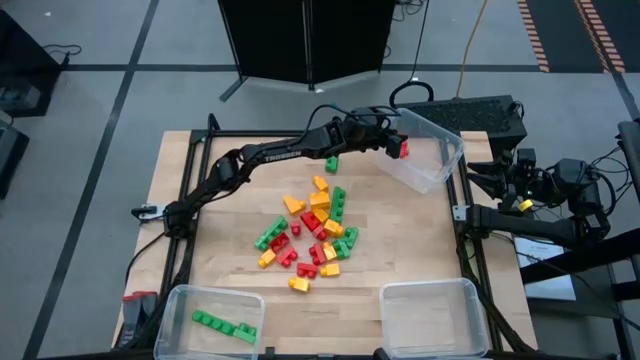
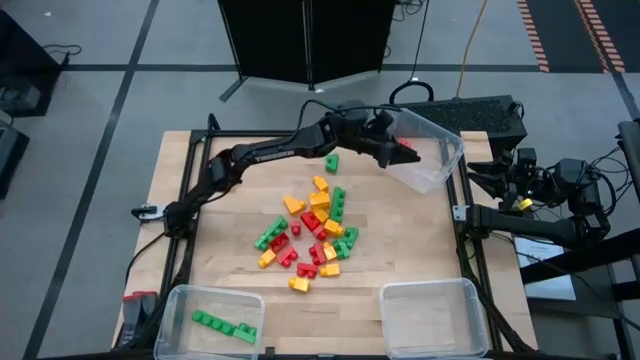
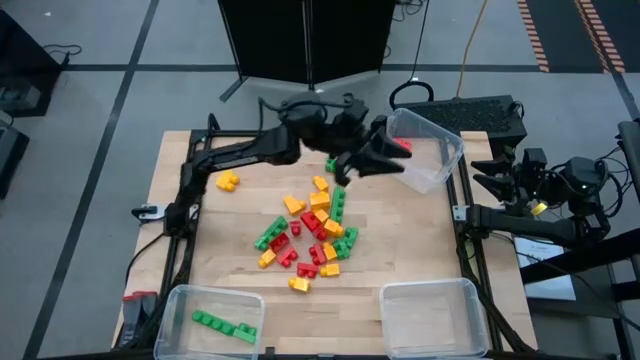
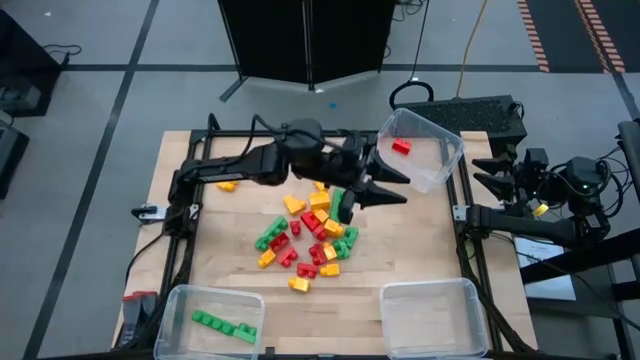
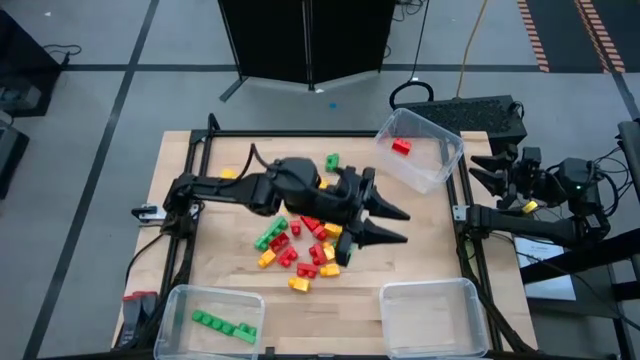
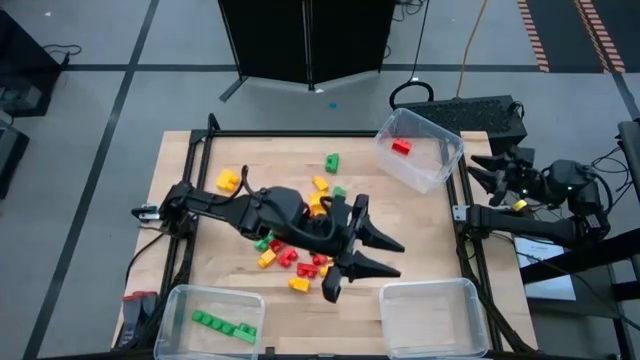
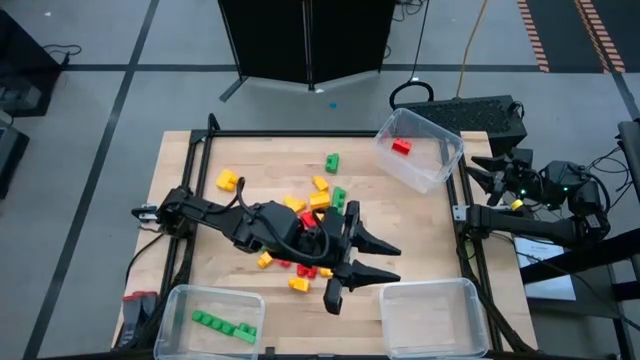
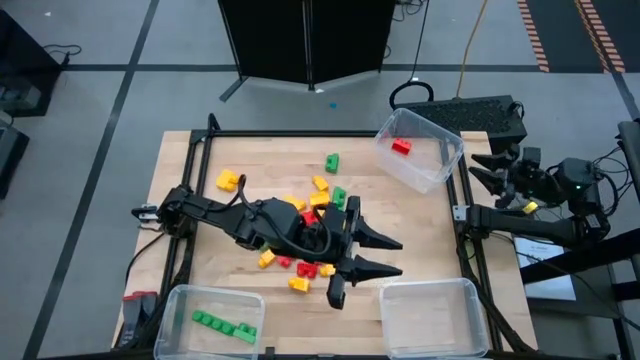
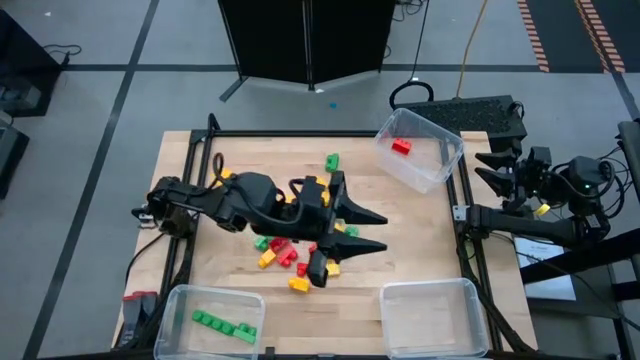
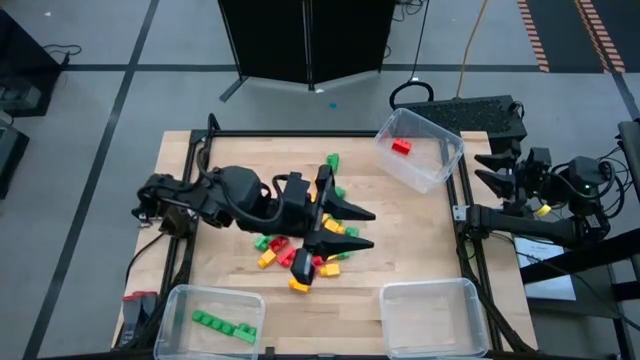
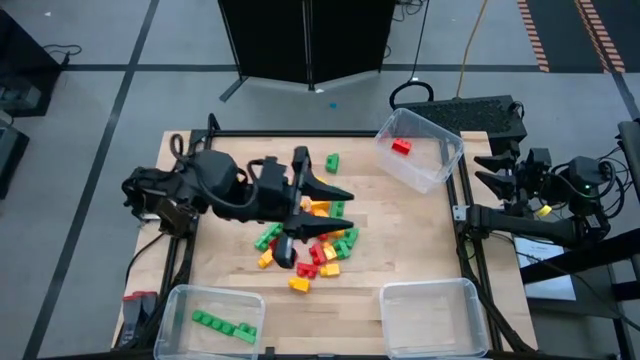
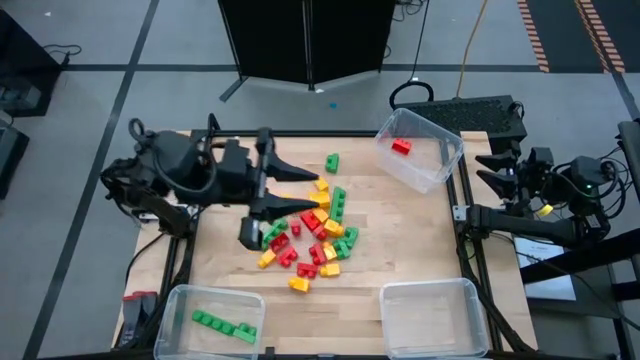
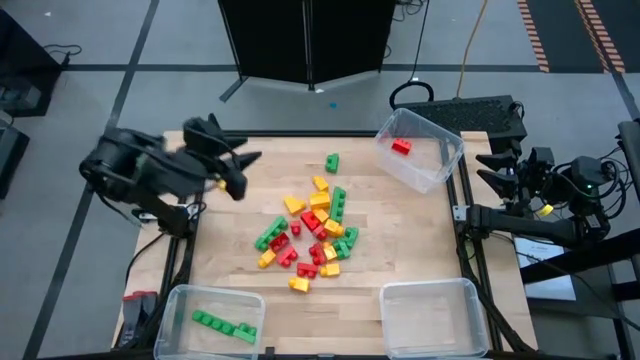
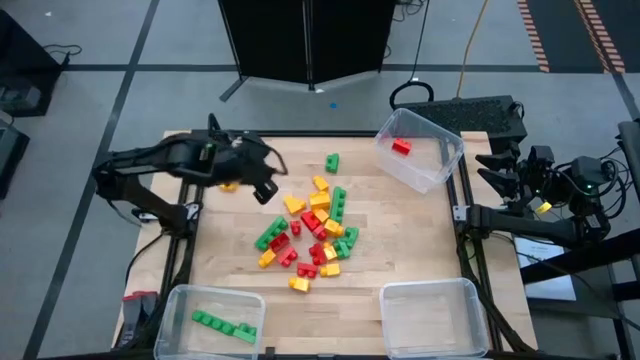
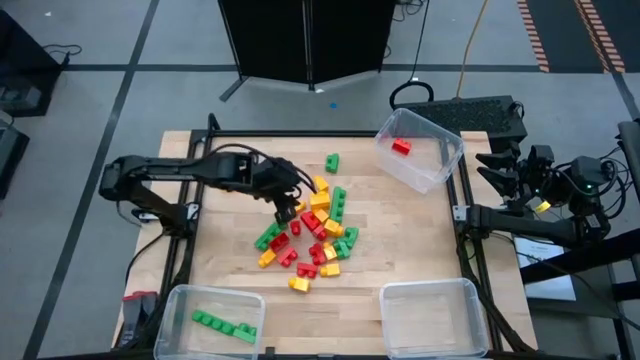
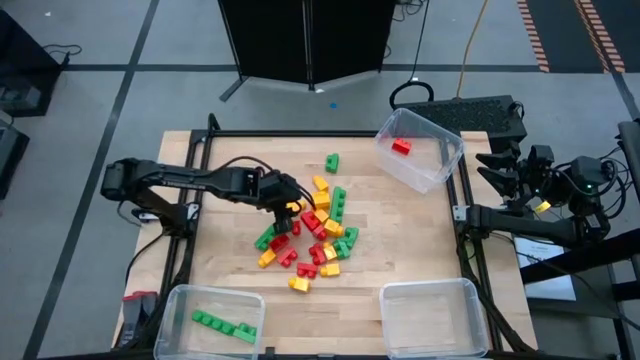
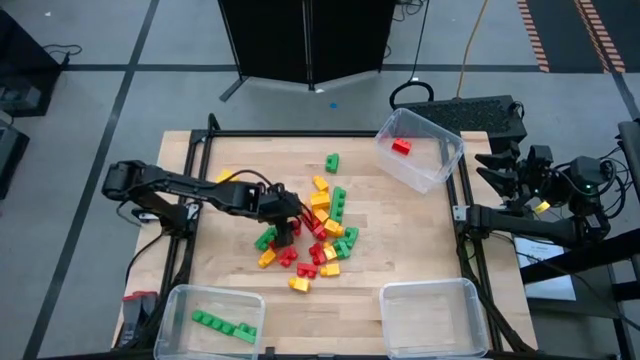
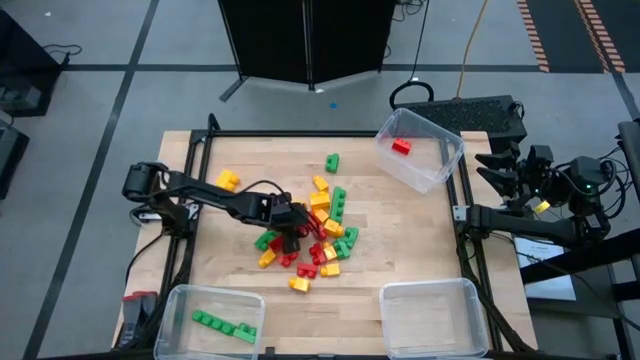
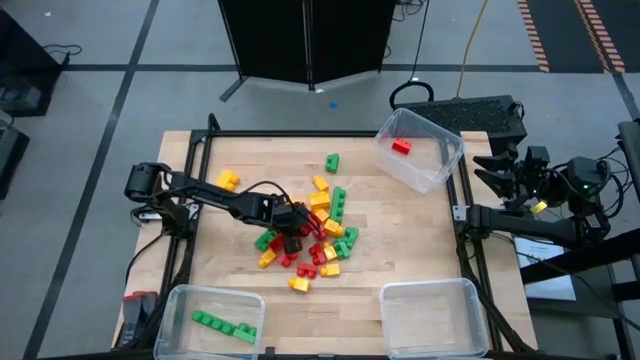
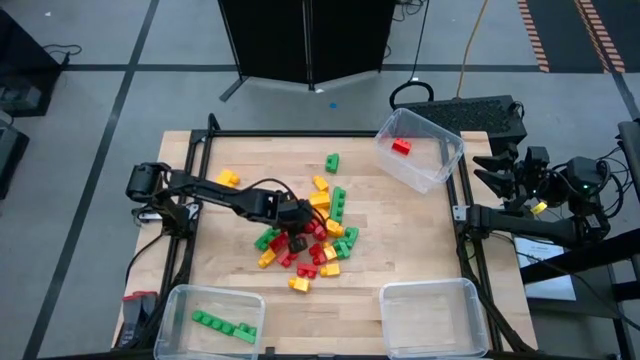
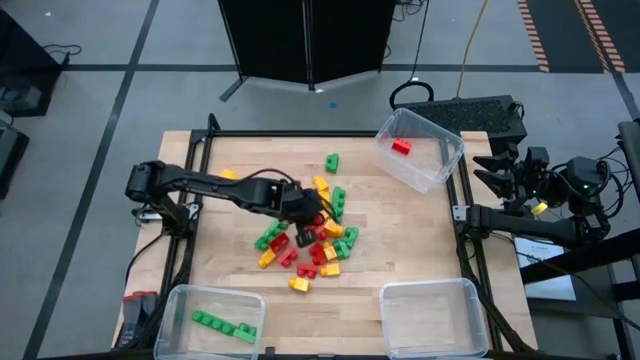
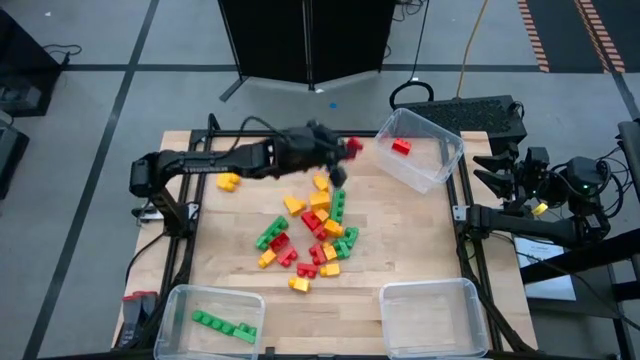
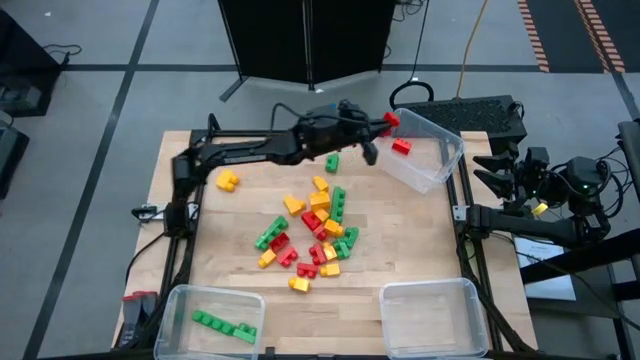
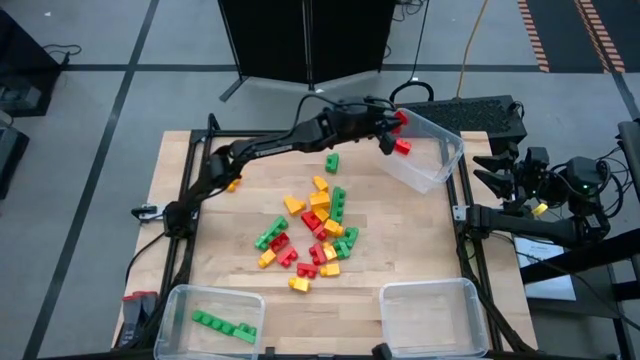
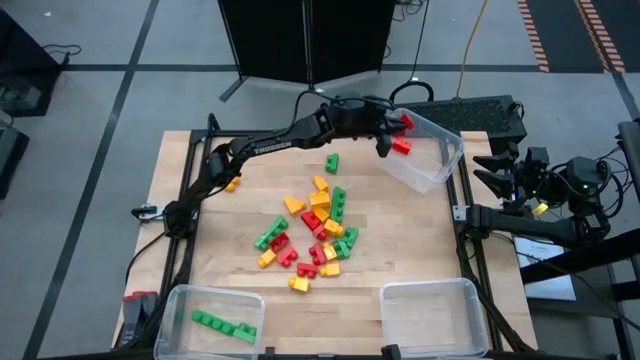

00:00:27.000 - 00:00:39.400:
Task: Sort blocks
Put the red game piece into the top transparent bin

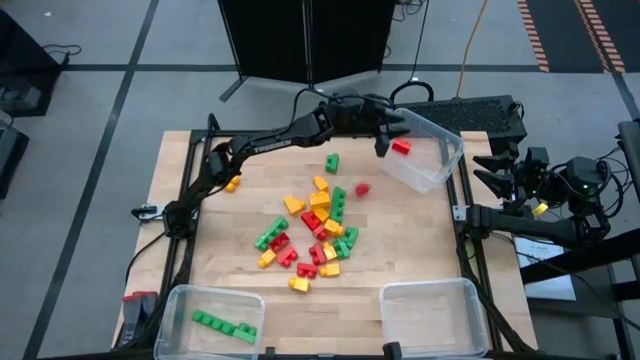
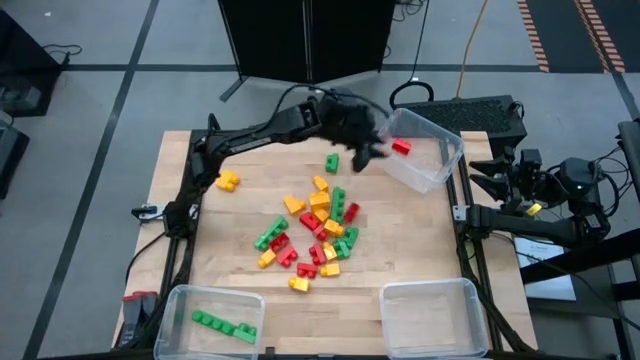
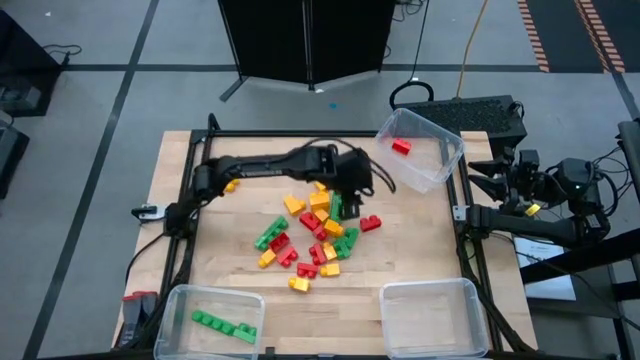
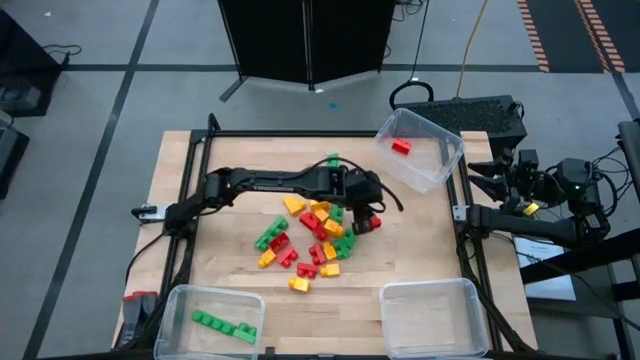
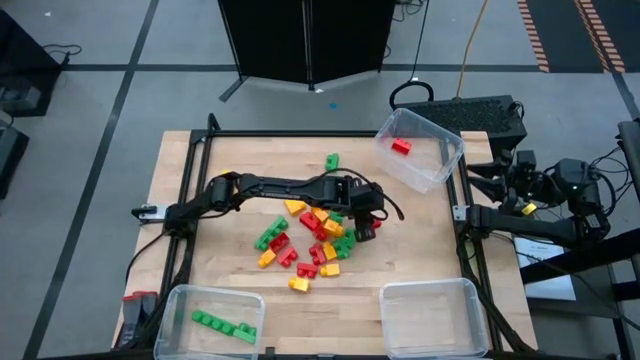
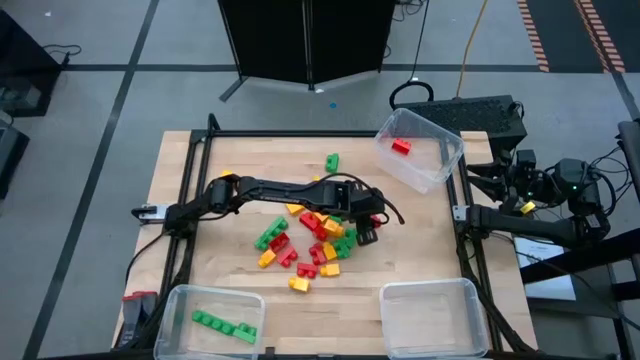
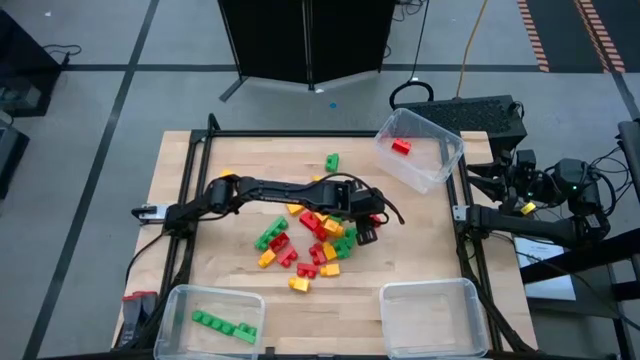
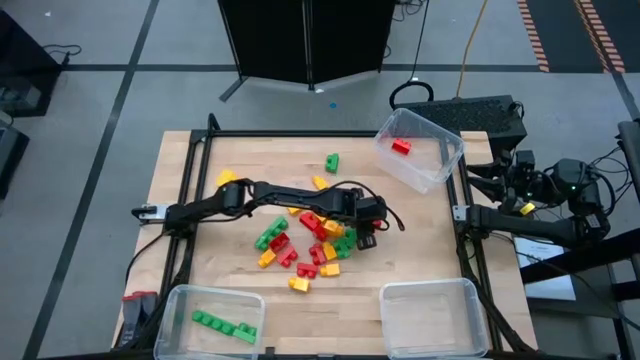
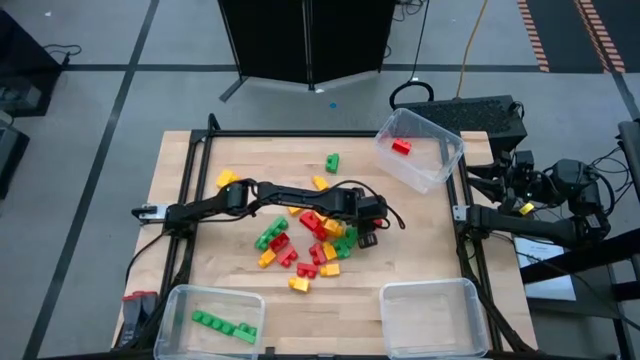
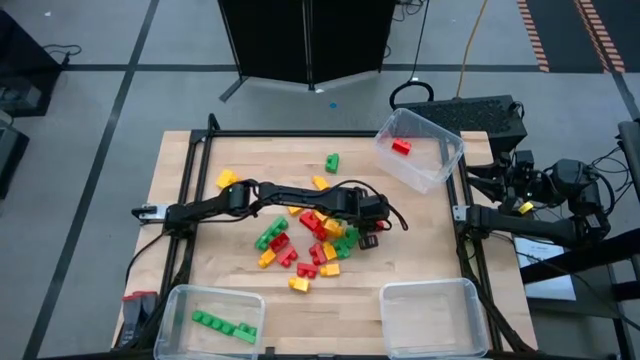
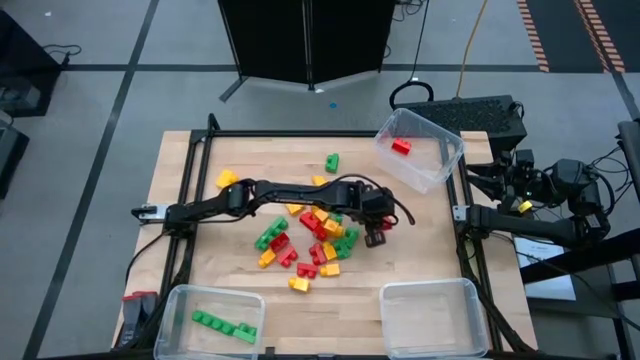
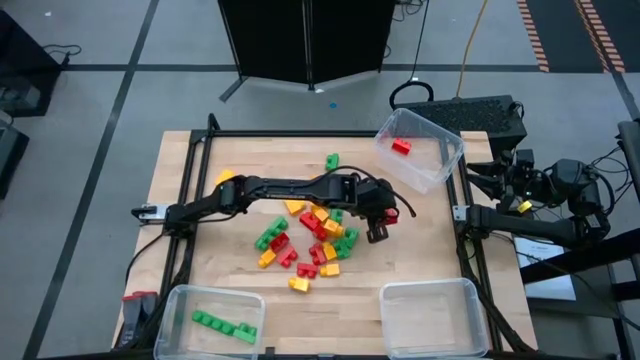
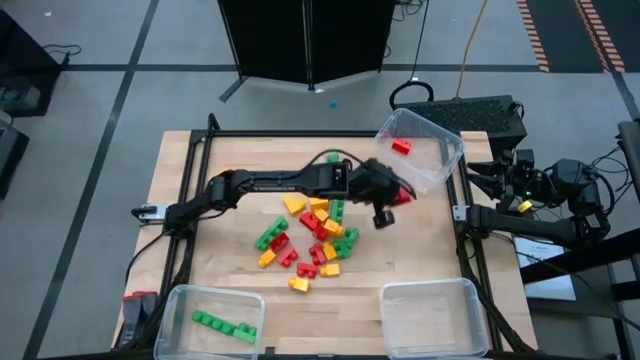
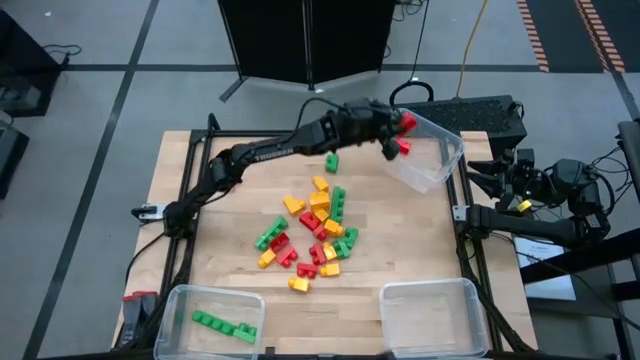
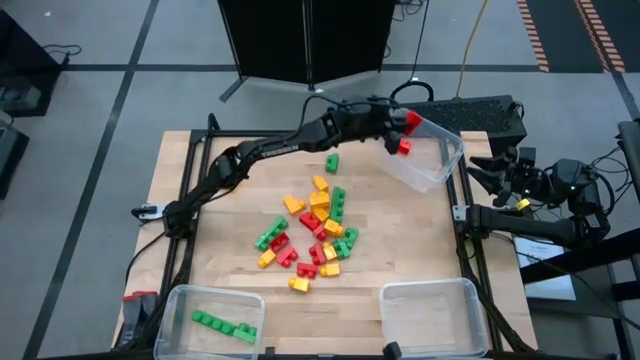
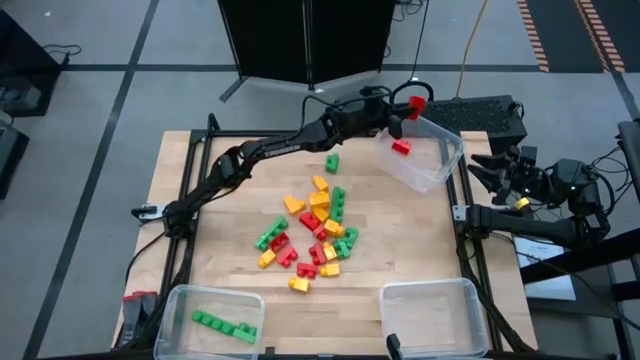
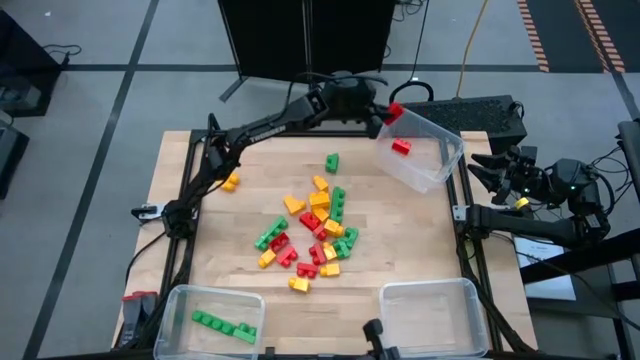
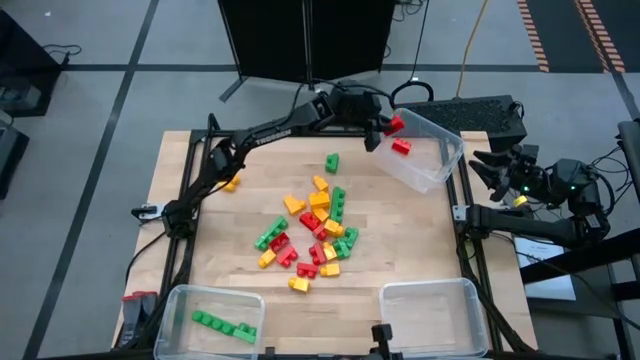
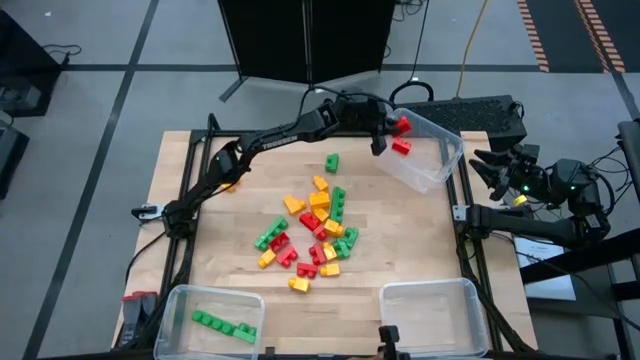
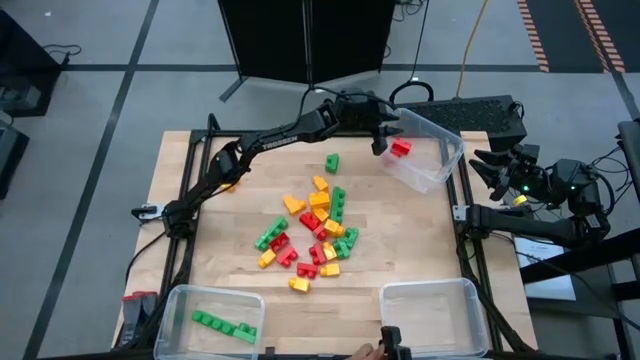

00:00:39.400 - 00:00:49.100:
Put the red game piece into the top transparent bin
